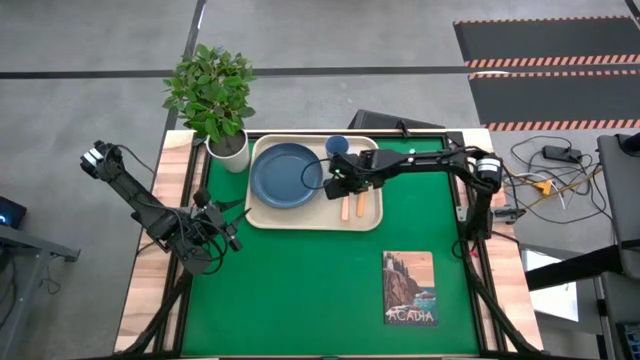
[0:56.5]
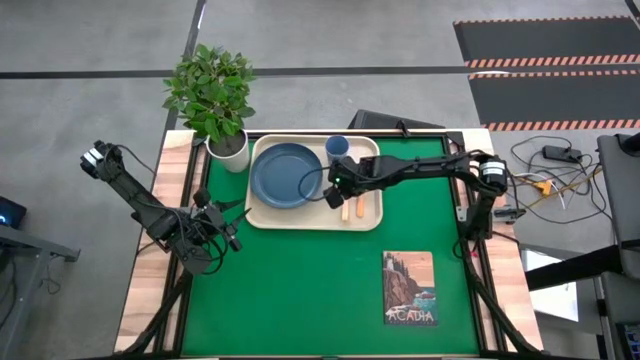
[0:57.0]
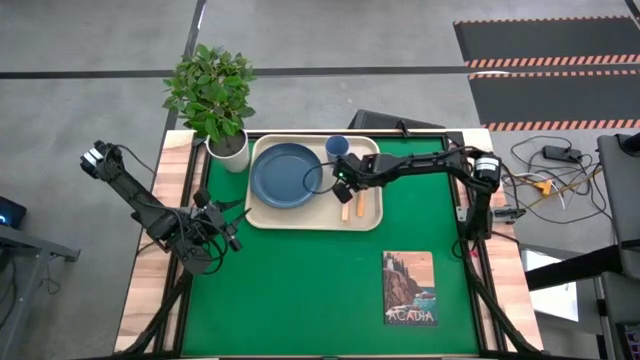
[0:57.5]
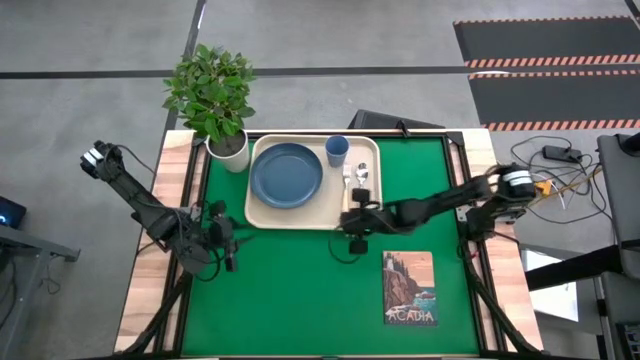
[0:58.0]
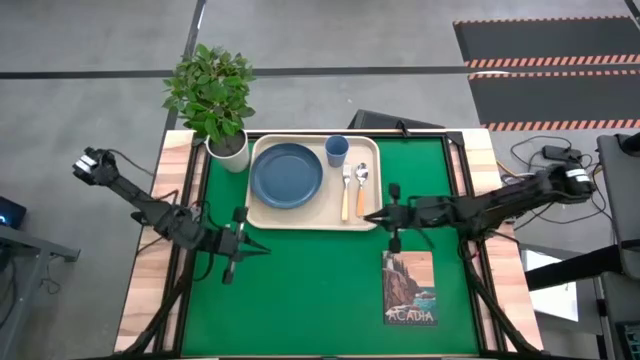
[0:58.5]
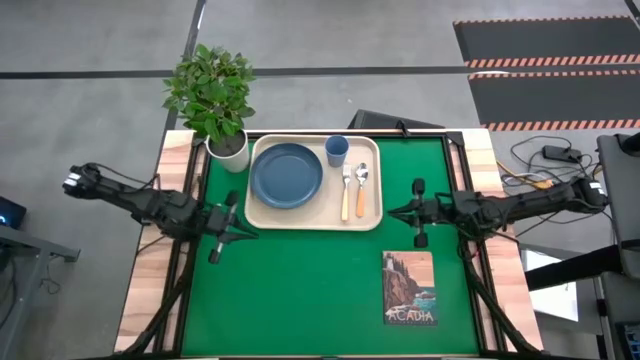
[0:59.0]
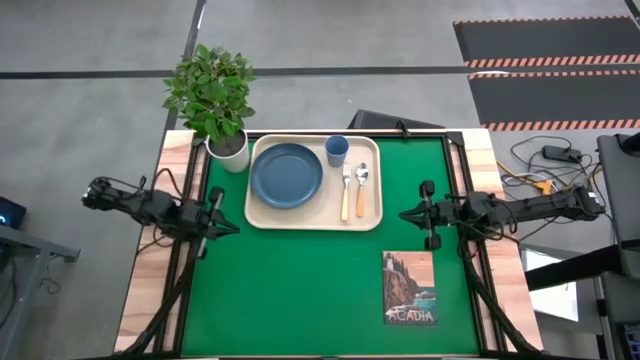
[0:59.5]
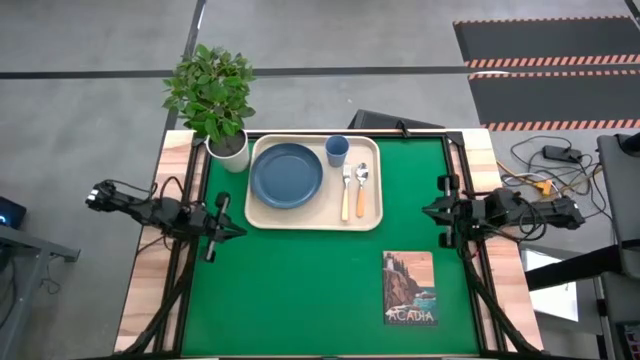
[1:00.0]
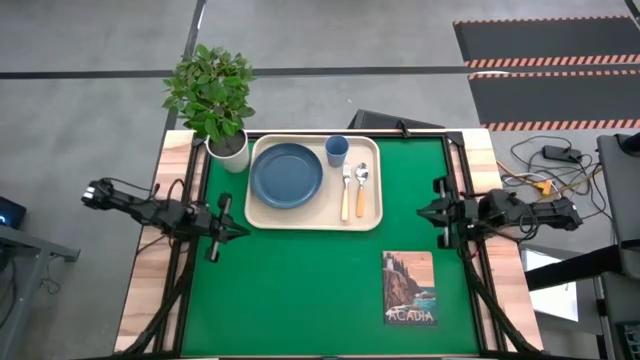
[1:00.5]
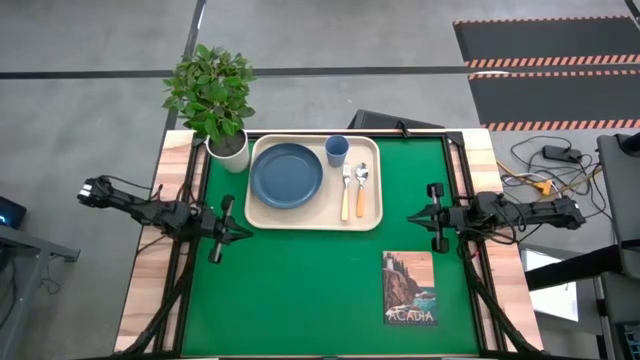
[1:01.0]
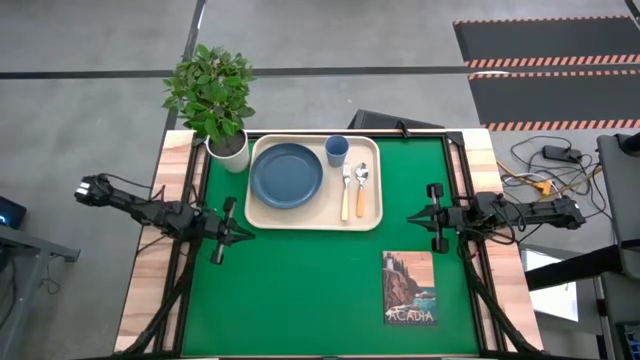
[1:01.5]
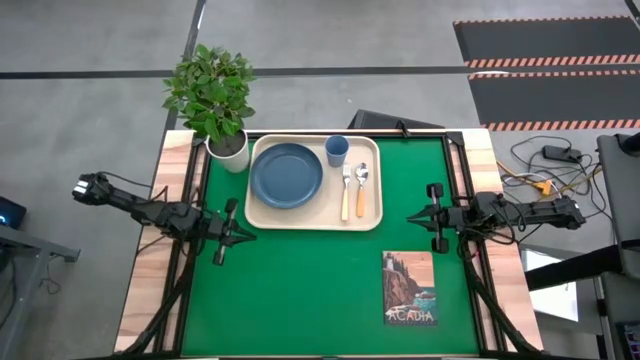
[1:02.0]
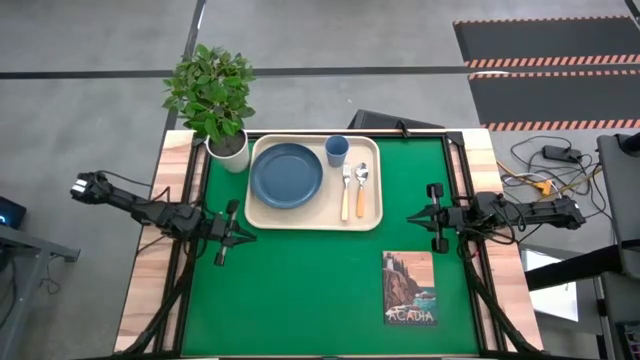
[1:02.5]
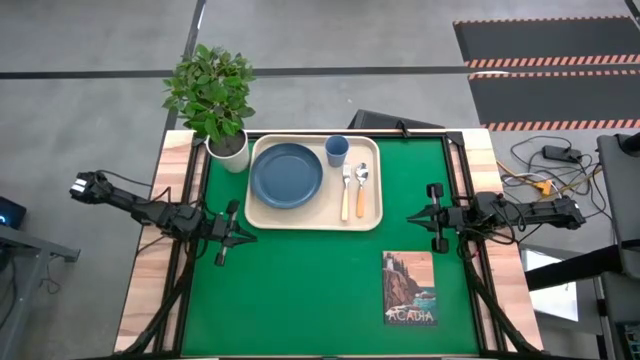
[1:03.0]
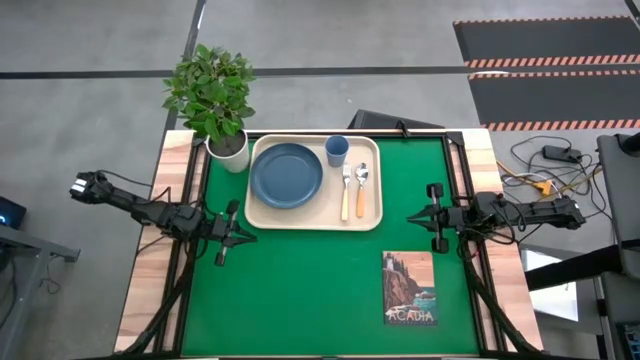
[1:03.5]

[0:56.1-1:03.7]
Task: Pick and place plate/cup/fork/spoon on tray
Return to Home Position

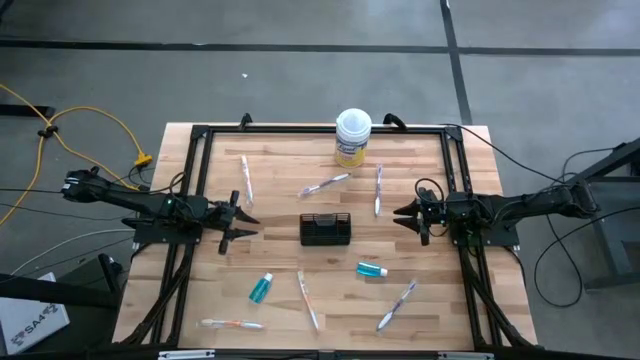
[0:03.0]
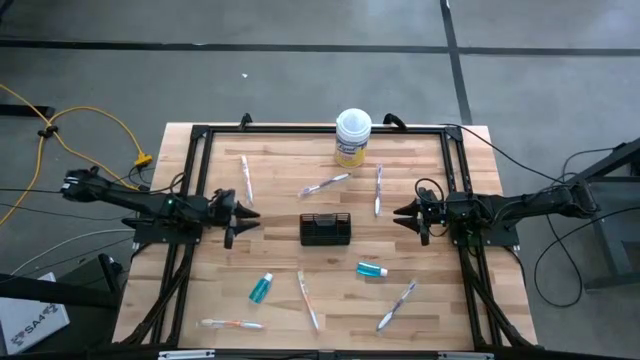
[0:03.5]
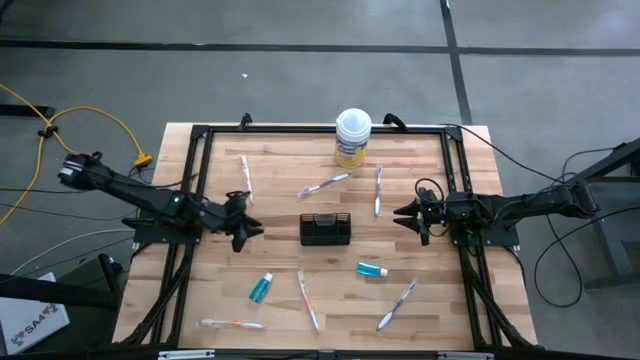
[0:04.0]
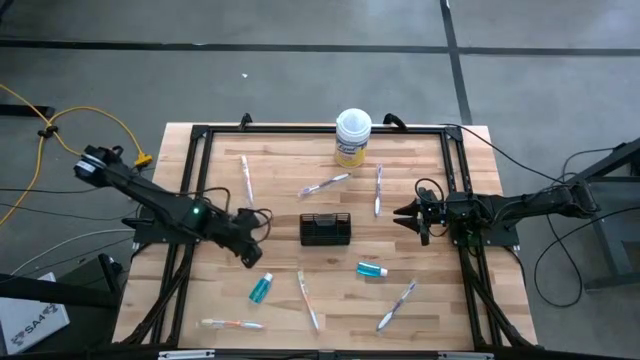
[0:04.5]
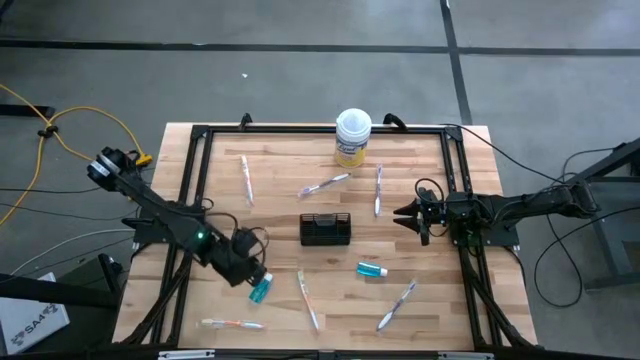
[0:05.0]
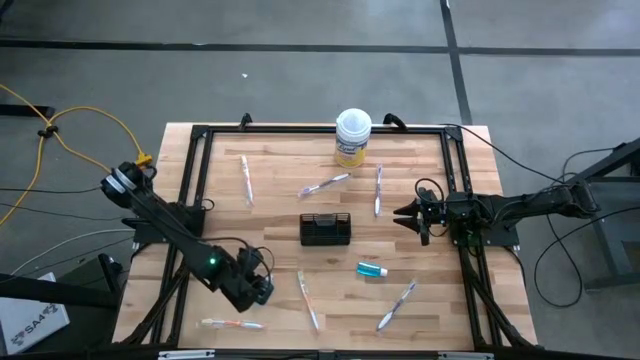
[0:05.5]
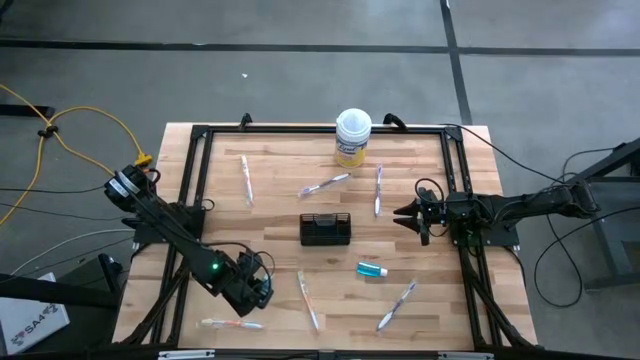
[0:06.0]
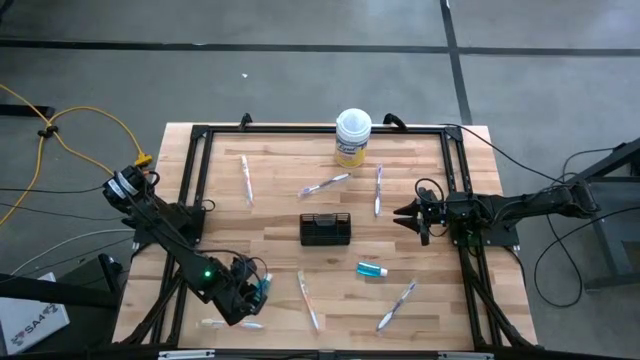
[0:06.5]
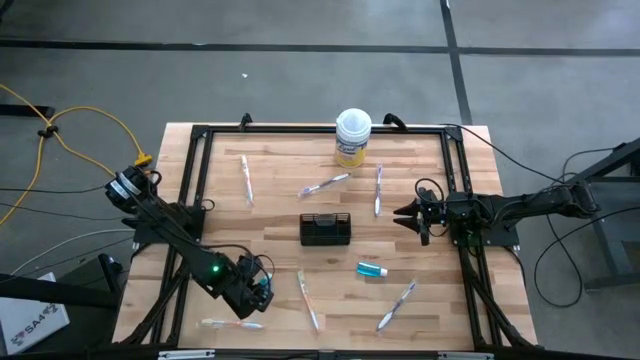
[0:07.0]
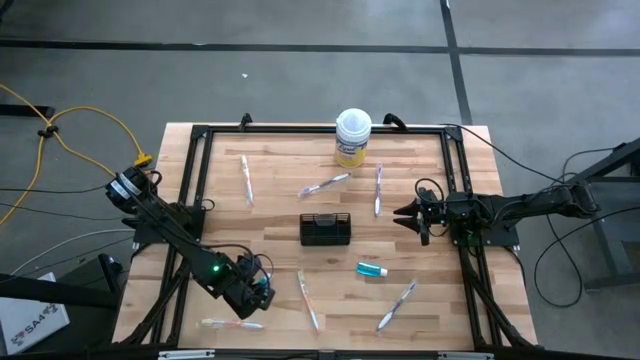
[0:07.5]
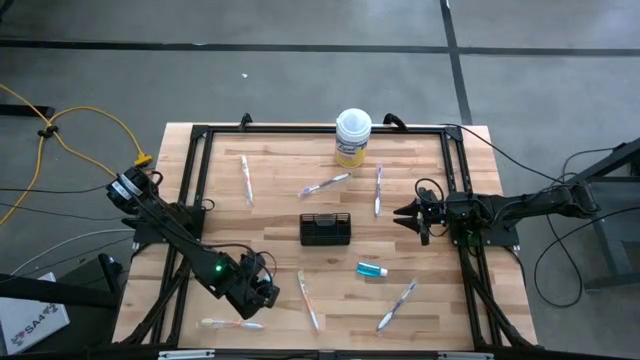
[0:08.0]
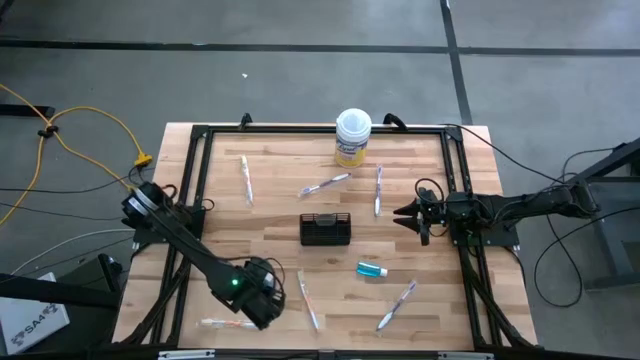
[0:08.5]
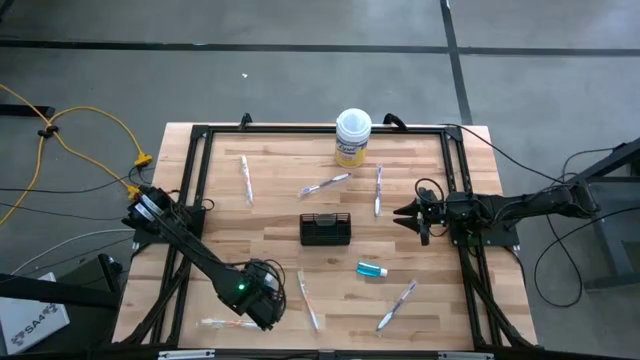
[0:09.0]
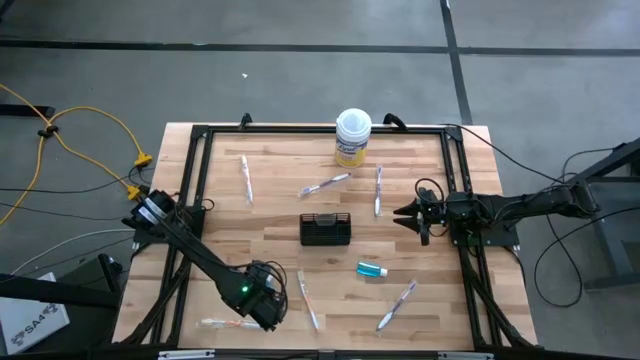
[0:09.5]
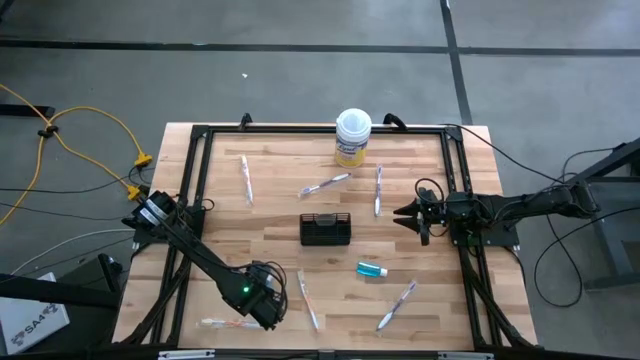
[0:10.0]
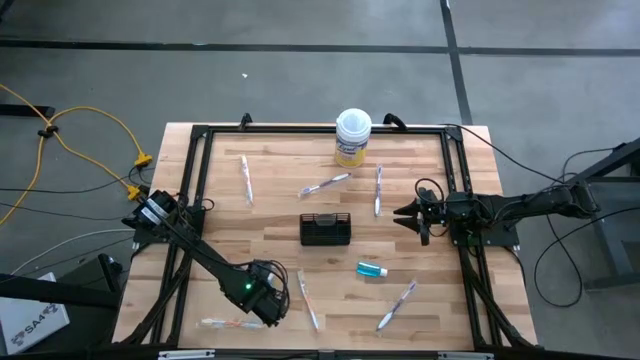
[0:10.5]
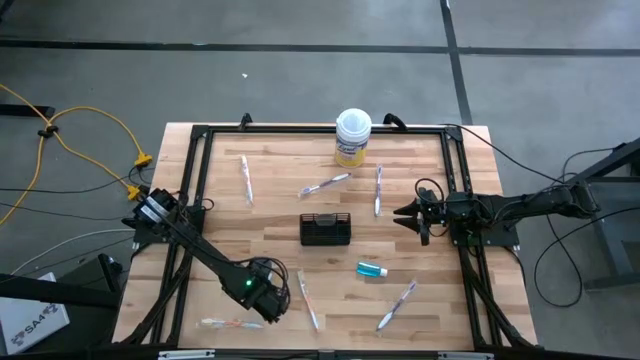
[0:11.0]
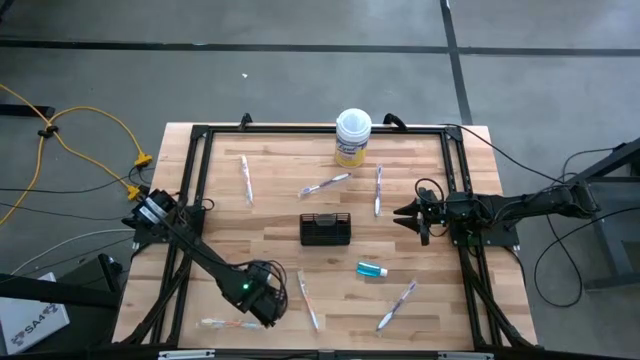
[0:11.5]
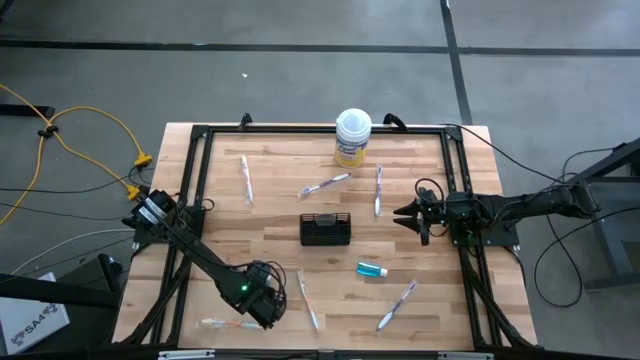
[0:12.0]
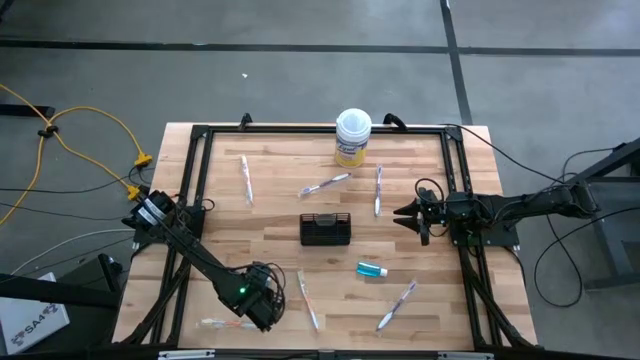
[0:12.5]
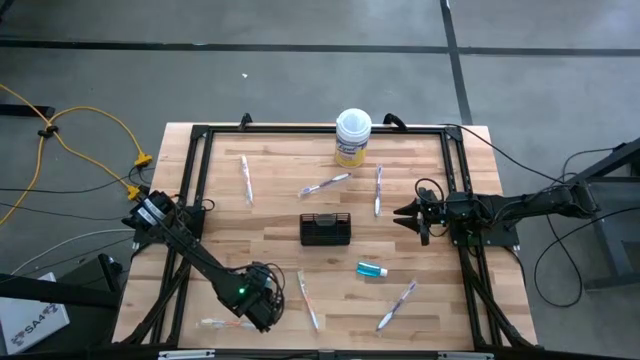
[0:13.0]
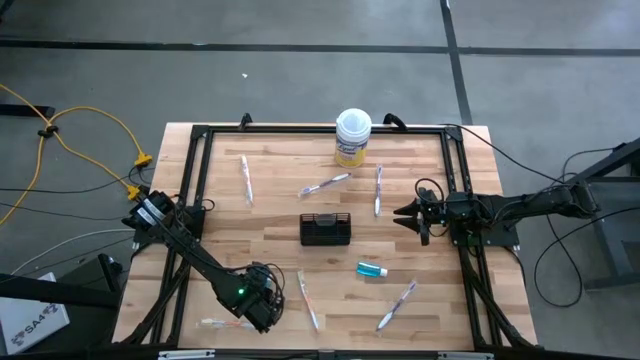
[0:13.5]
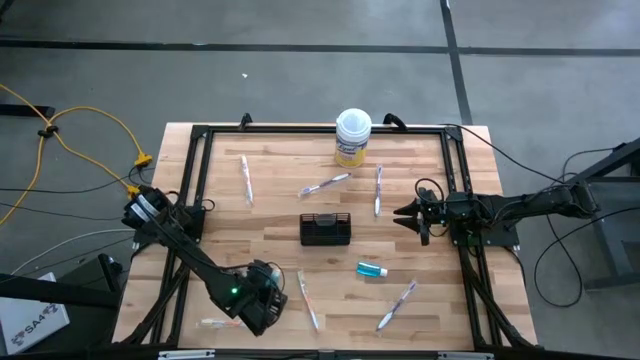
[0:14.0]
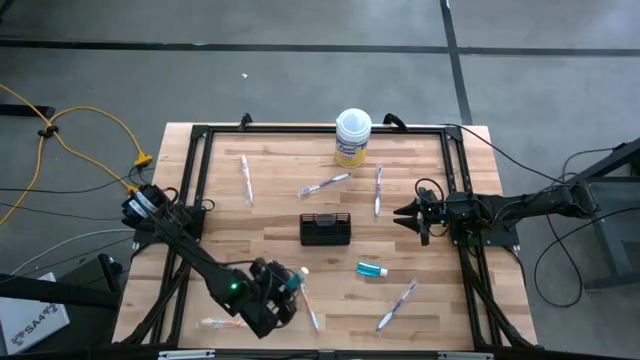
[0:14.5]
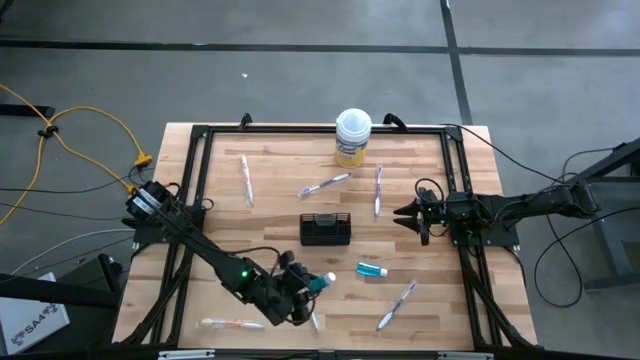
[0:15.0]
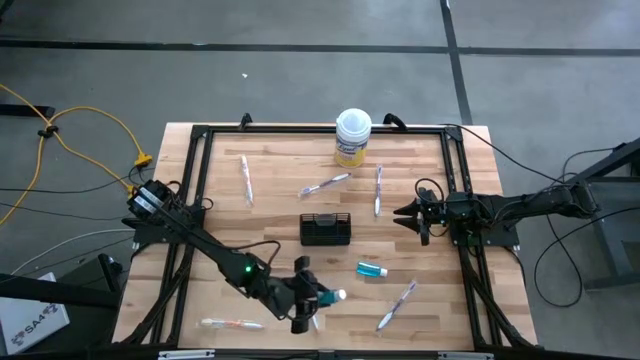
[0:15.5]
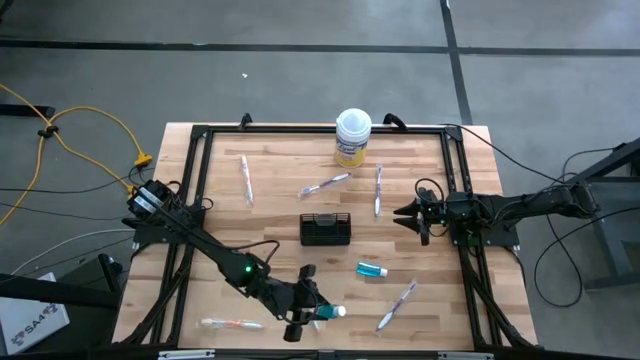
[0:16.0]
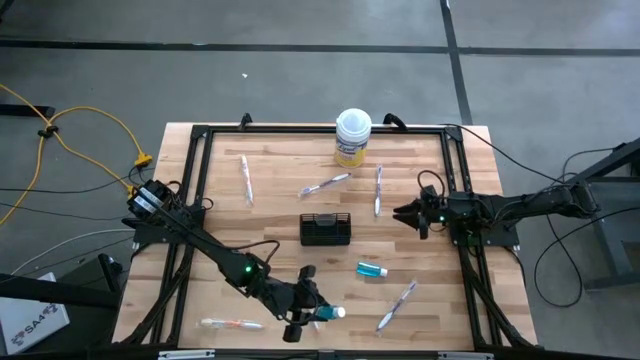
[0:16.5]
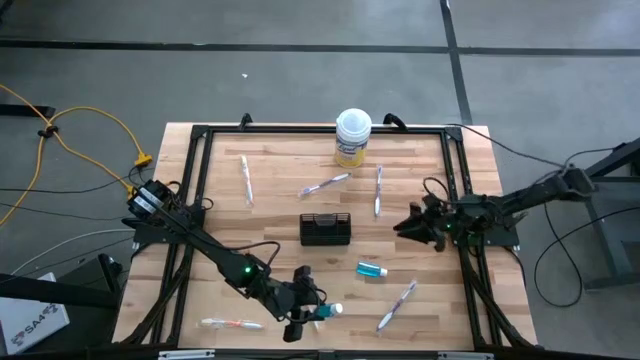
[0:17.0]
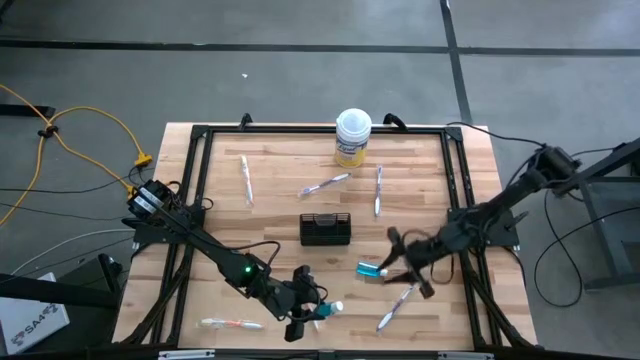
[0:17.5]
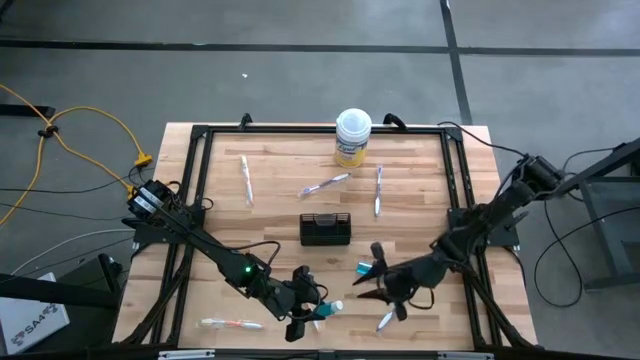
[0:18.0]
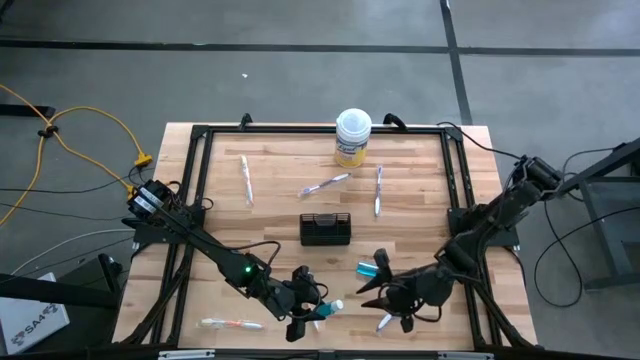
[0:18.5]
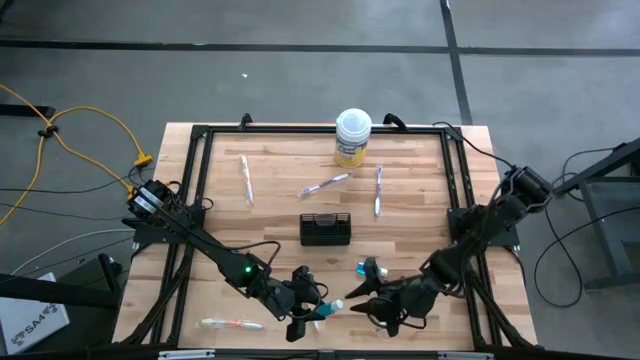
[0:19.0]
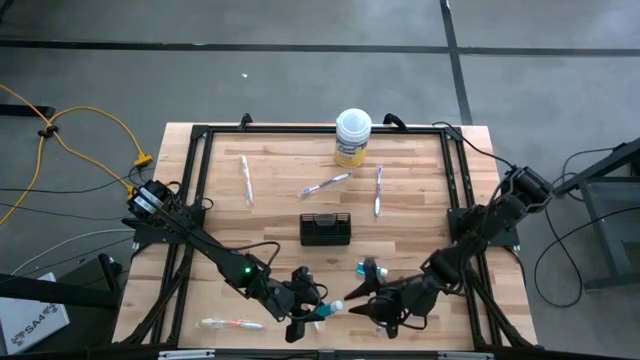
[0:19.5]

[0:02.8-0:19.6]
Task: Pick & Place toothbrushing station
Put the left blue mouthwash into the wire organizer
